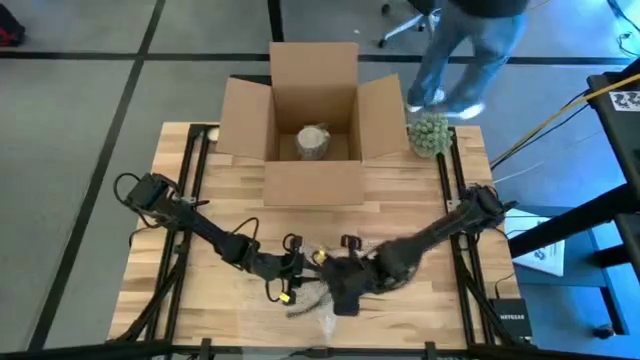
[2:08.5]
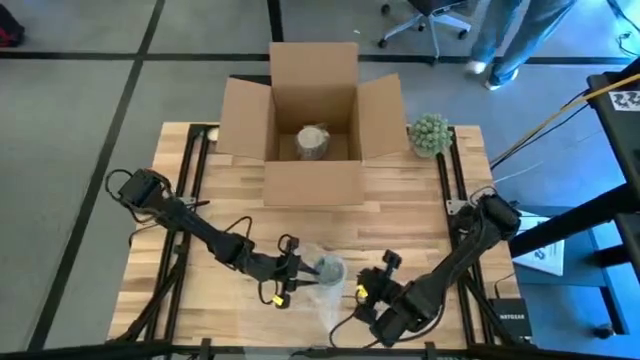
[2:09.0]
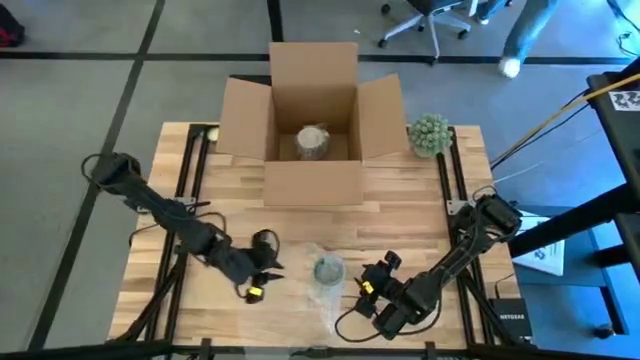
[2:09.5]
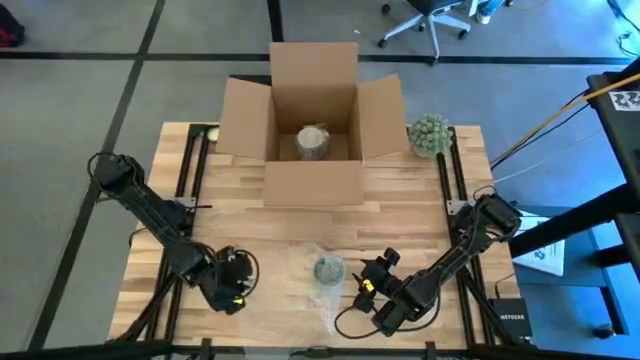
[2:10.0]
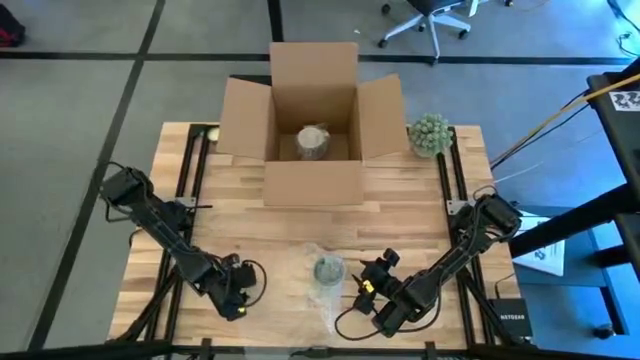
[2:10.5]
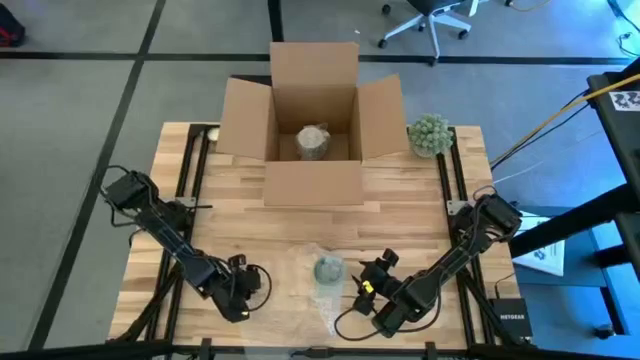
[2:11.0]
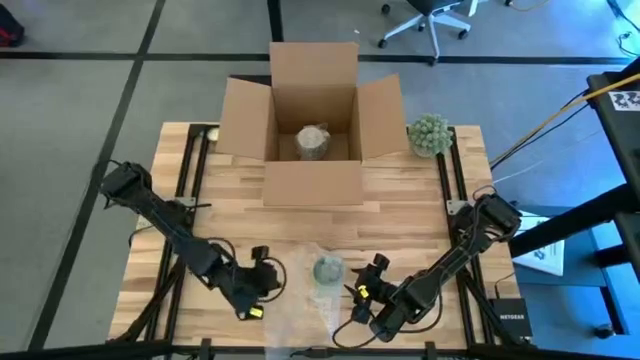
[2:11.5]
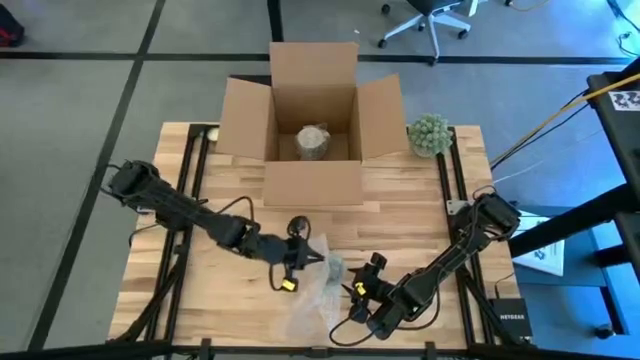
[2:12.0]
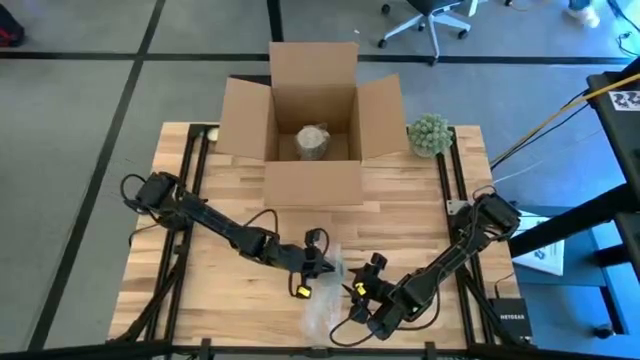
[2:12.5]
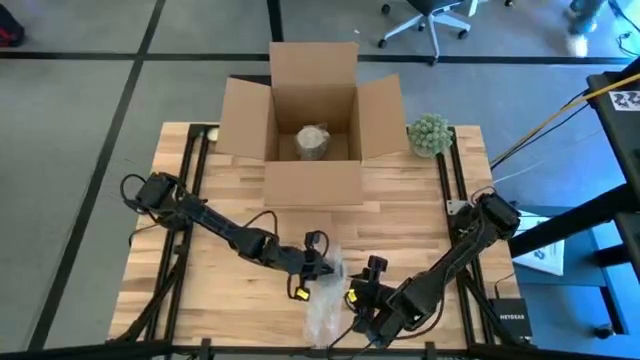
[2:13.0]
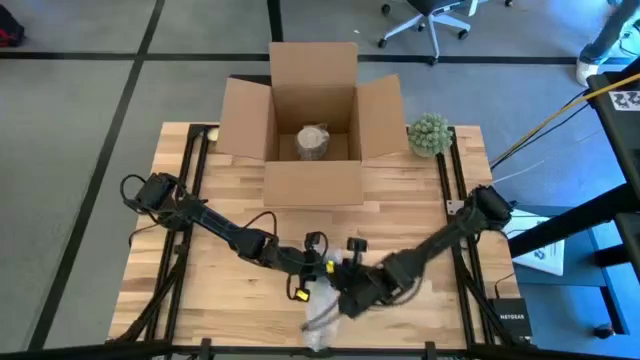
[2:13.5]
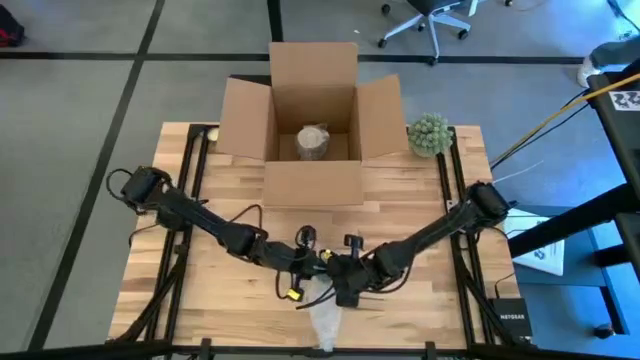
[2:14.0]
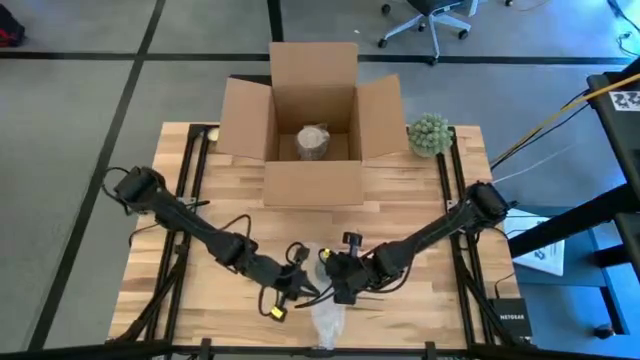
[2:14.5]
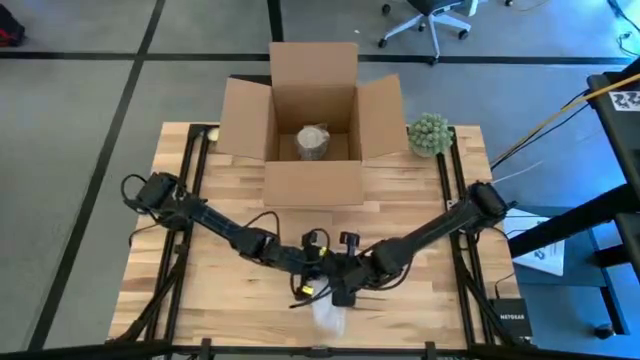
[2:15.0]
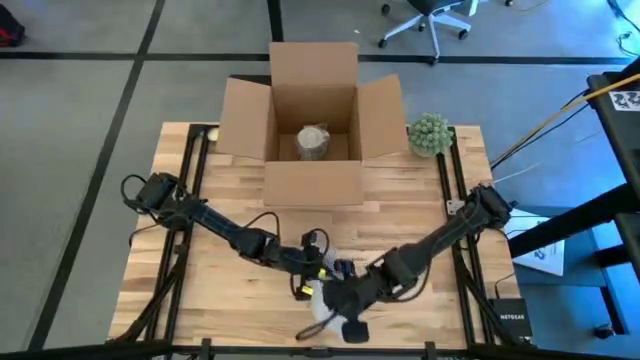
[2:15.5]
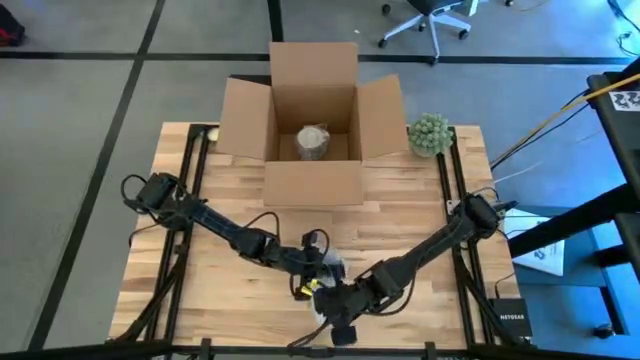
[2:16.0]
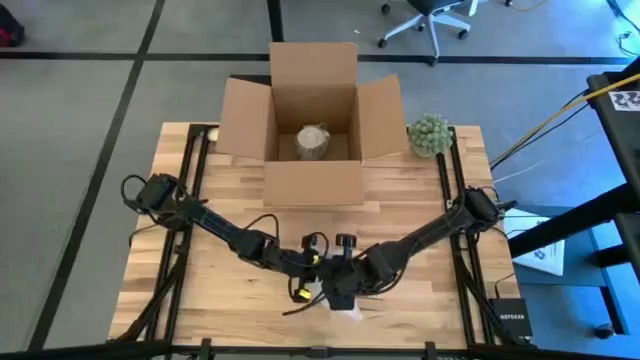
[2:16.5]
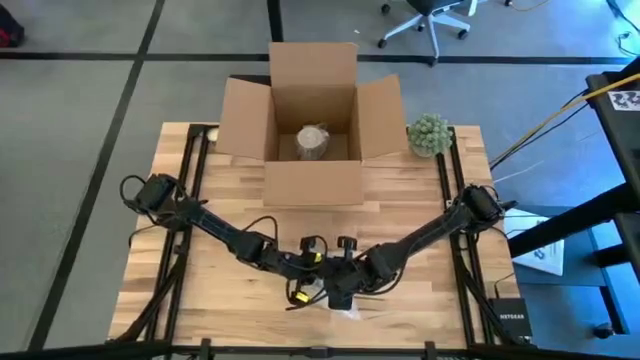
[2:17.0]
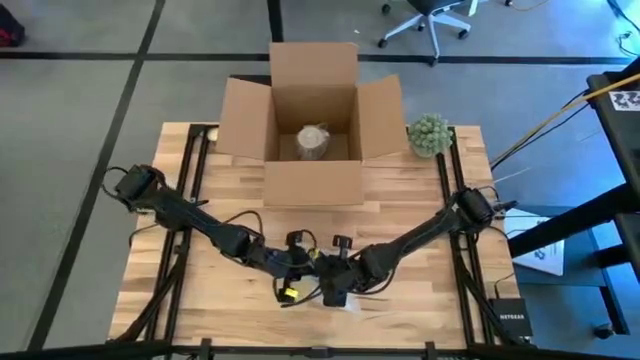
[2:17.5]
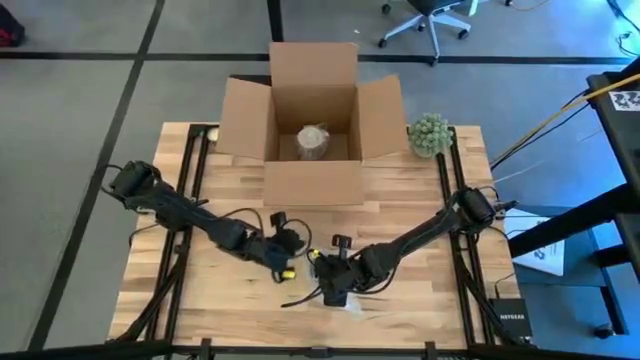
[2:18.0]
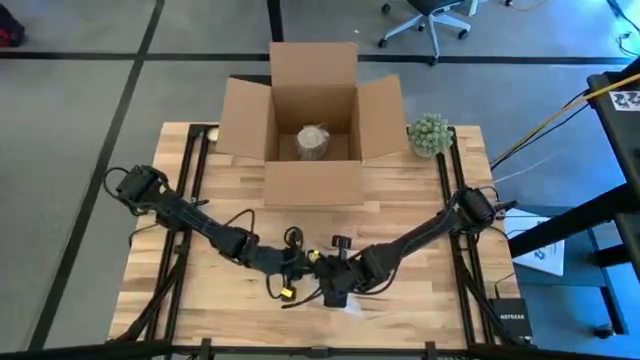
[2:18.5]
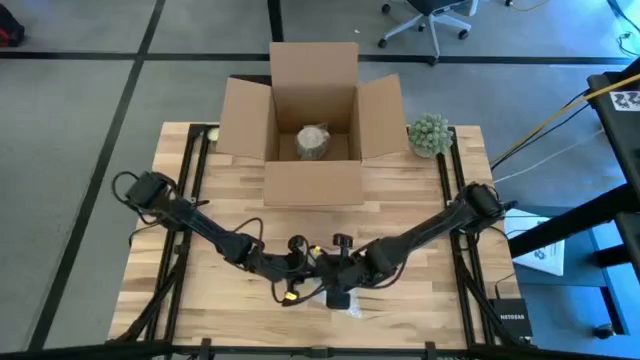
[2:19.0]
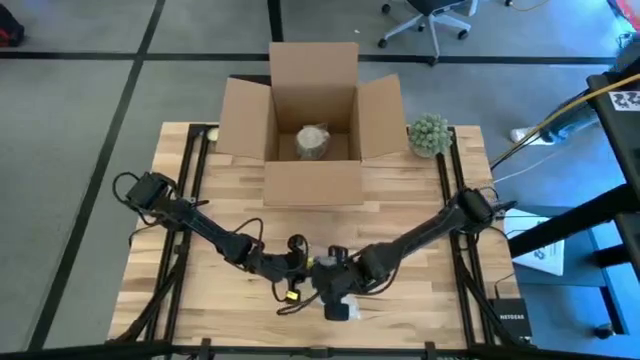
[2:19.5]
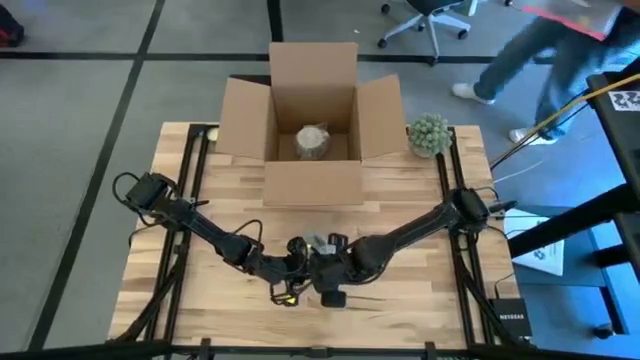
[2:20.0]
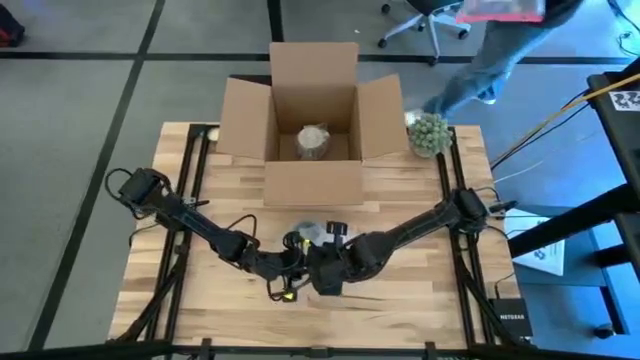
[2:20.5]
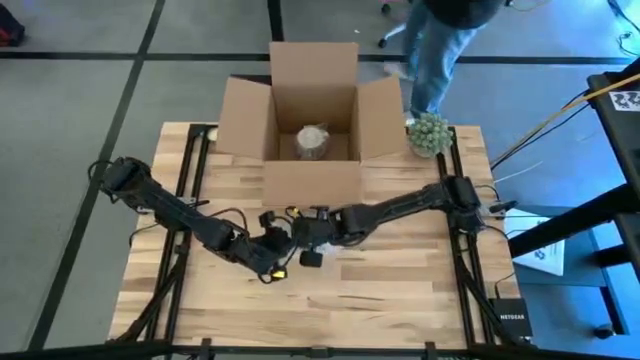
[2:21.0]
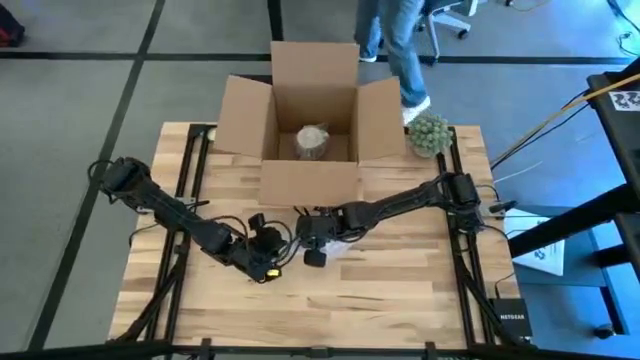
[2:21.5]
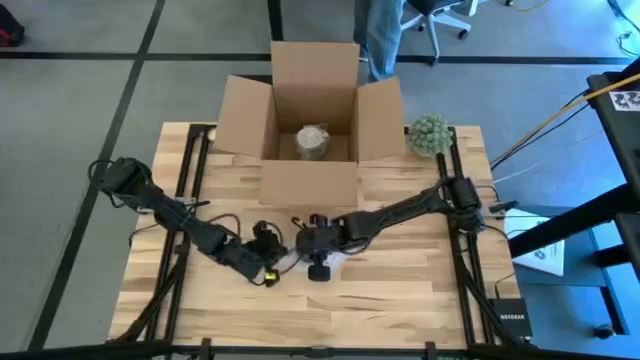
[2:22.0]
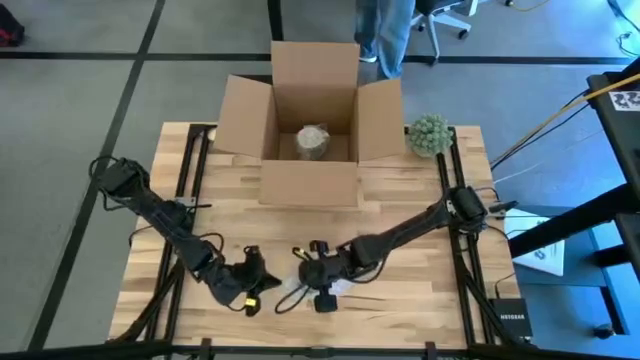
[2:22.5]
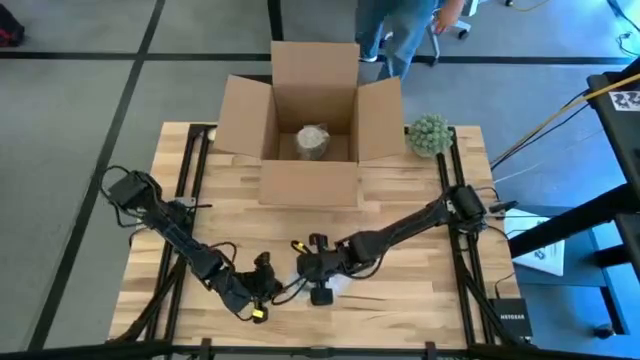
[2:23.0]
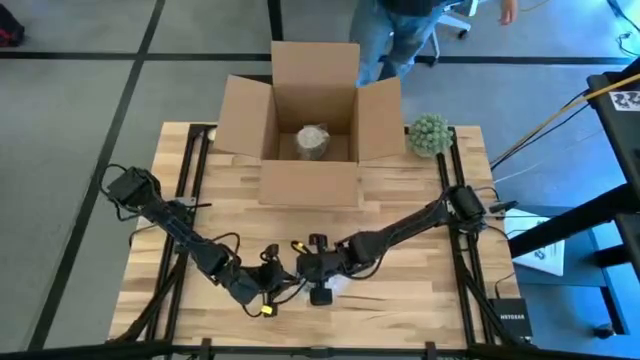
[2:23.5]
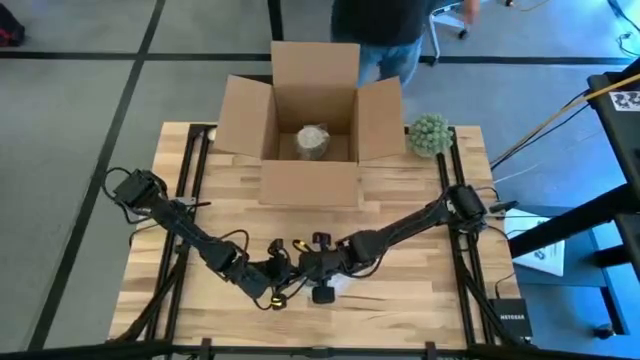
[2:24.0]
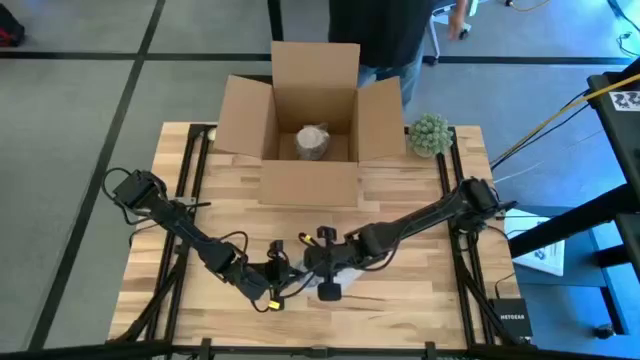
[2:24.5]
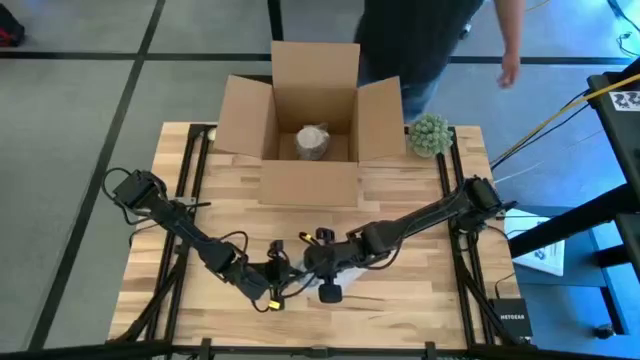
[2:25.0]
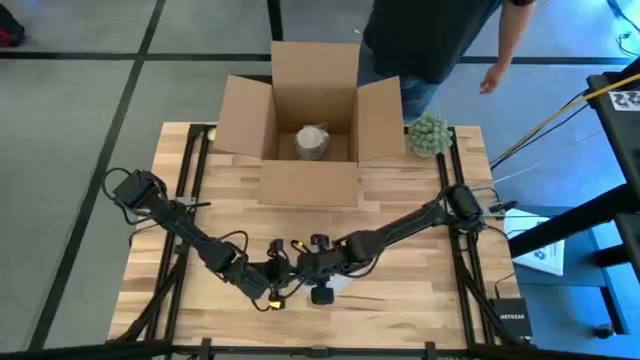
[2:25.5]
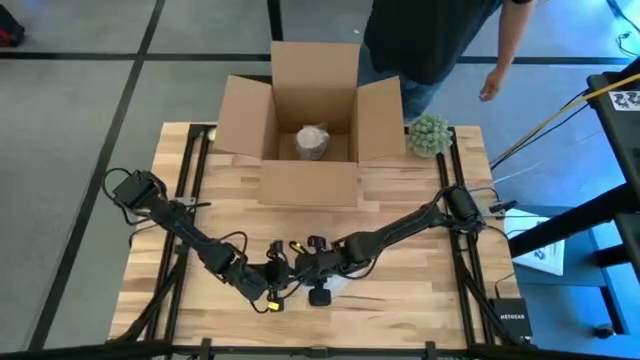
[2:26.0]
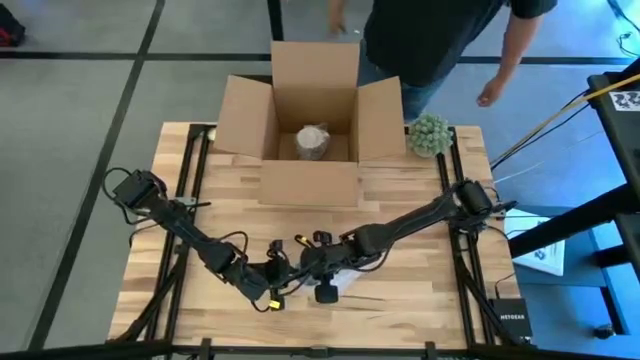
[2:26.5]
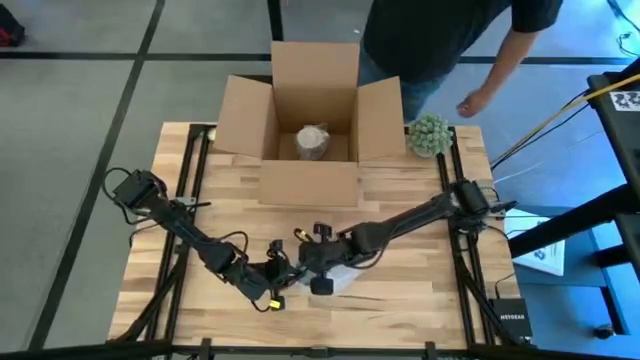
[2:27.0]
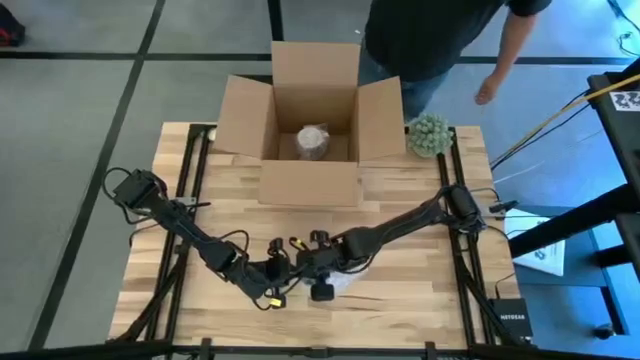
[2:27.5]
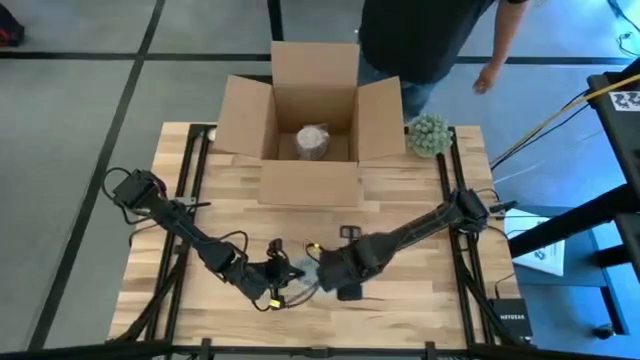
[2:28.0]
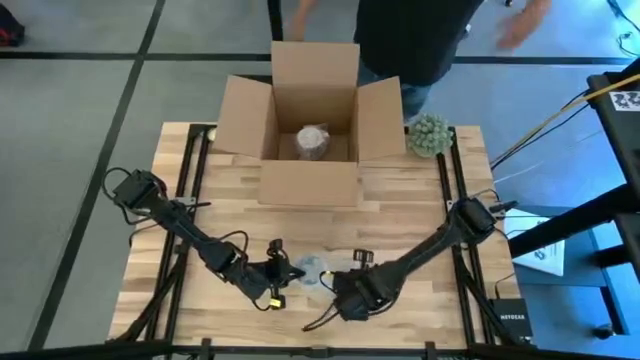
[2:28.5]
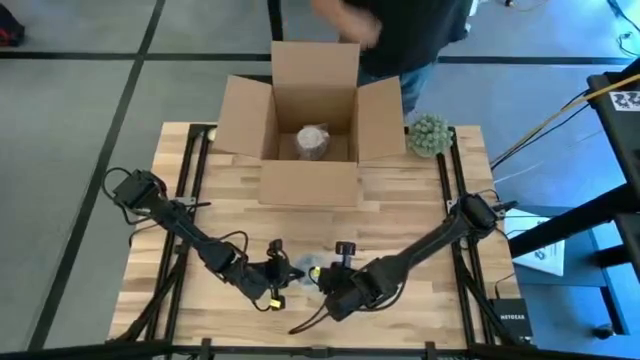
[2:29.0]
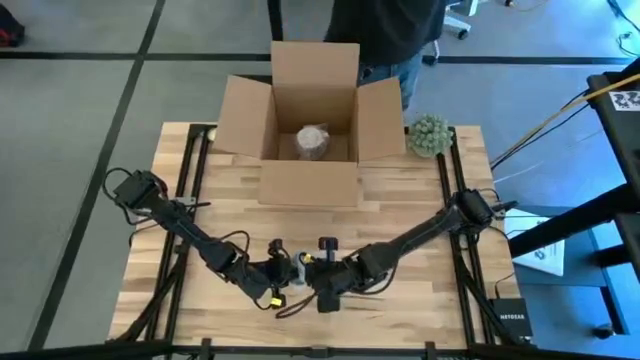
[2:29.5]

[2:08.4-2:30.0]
Task: wrap mug
Wrap the dark green mug using the transparent bubble wrap
